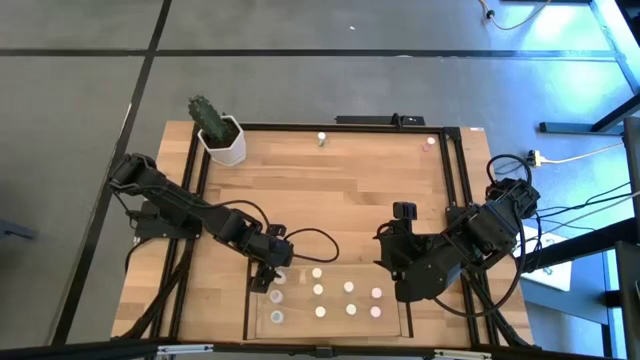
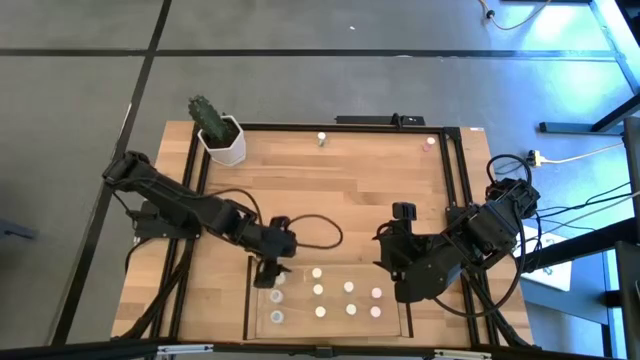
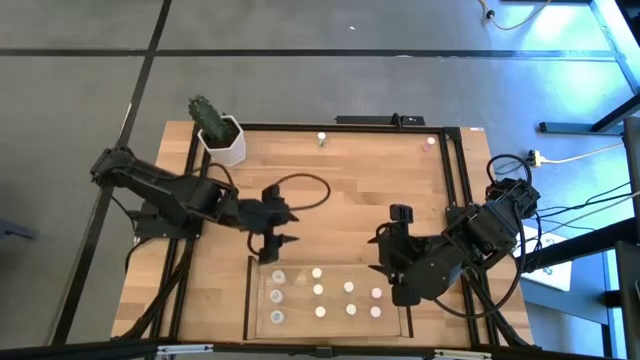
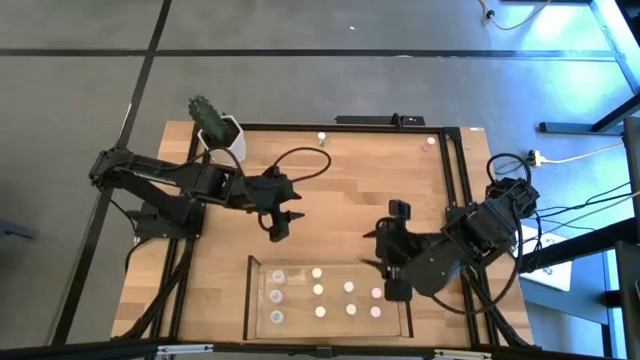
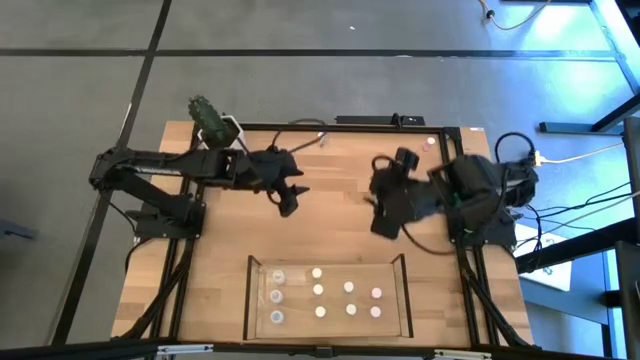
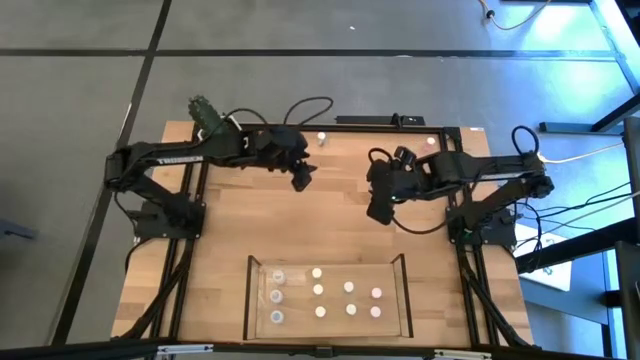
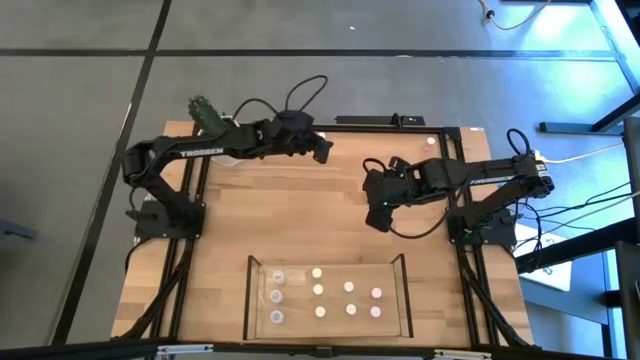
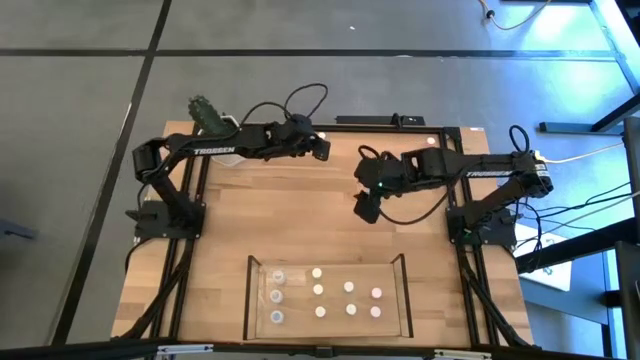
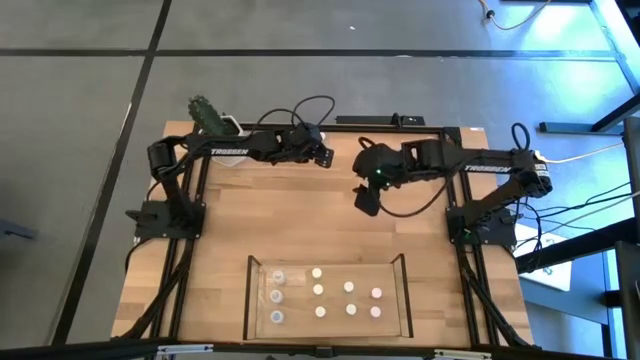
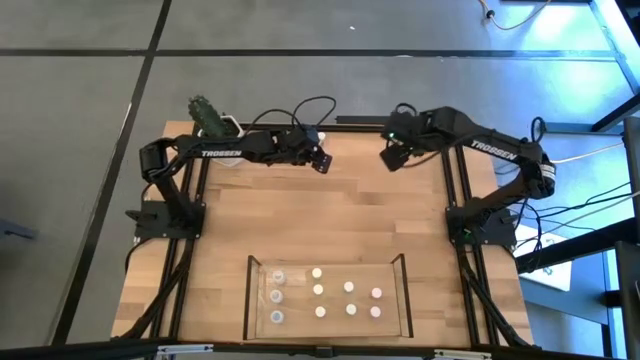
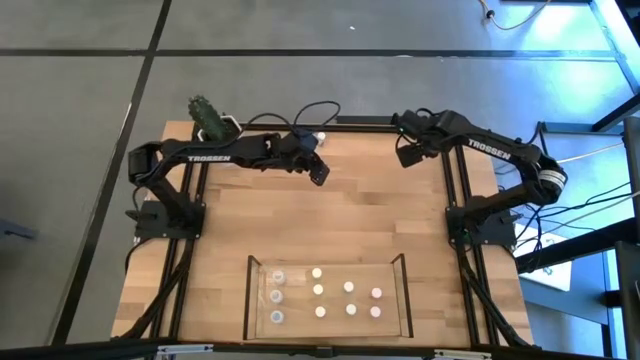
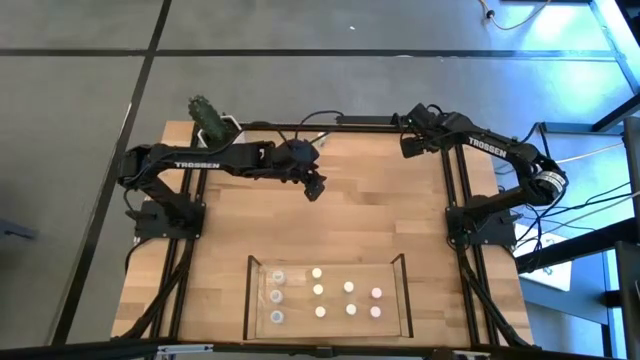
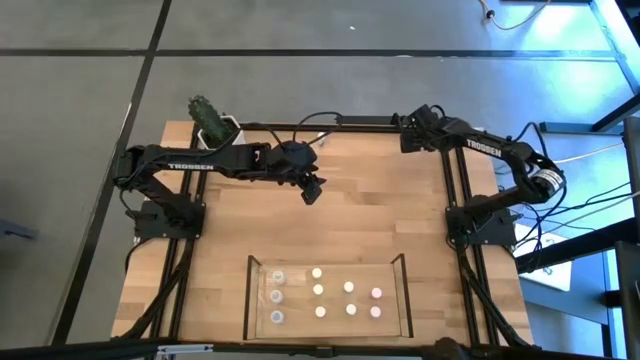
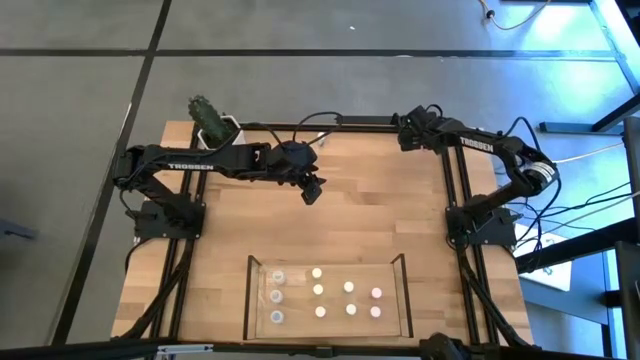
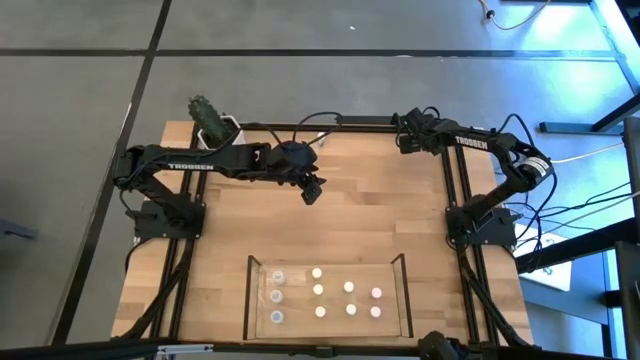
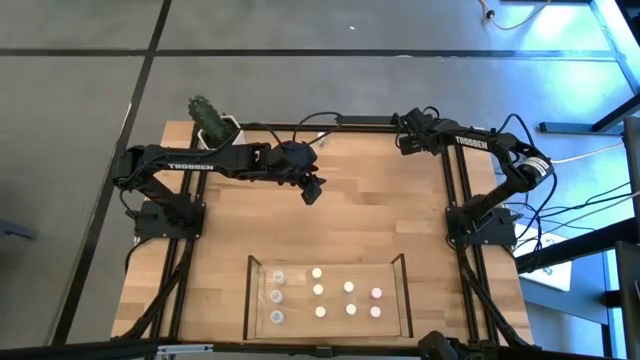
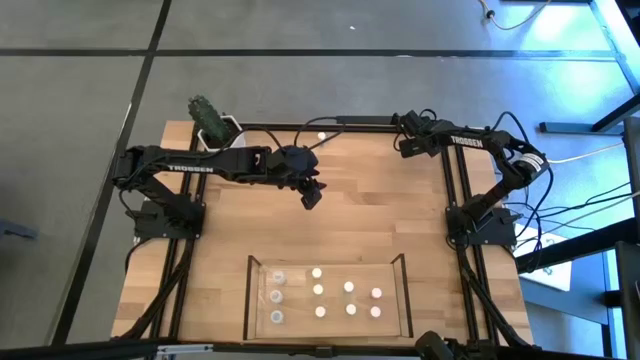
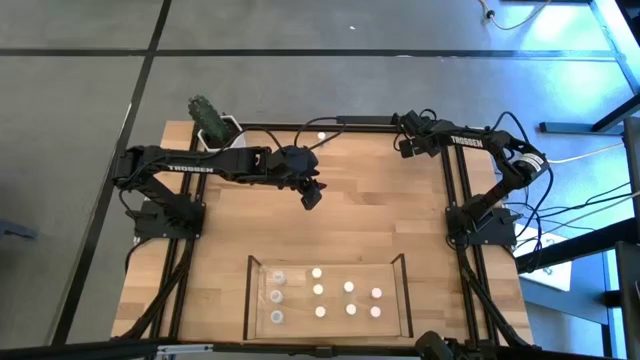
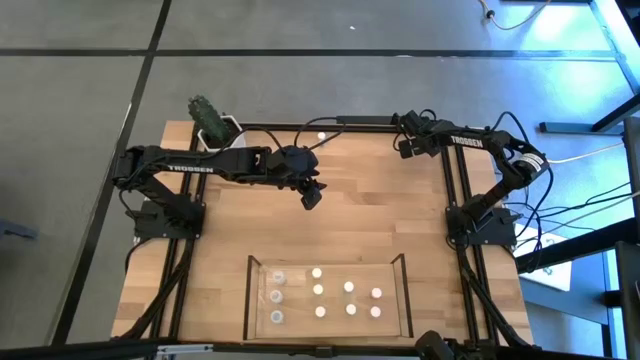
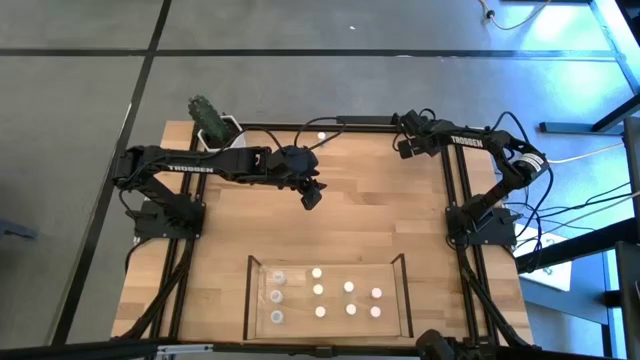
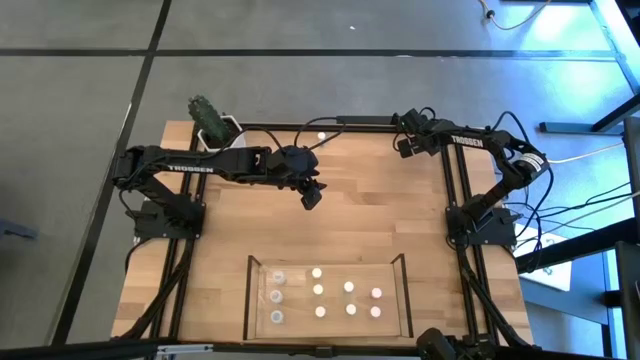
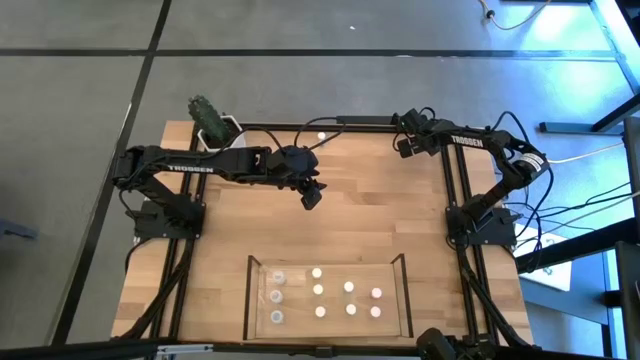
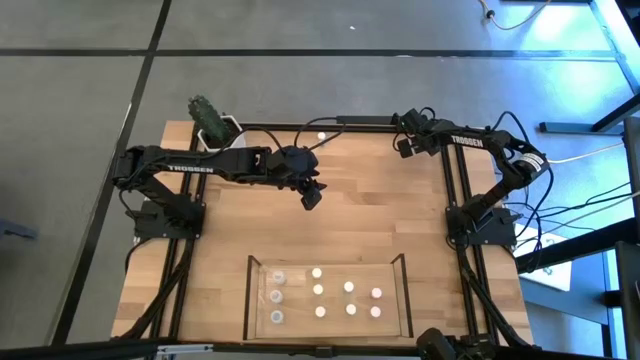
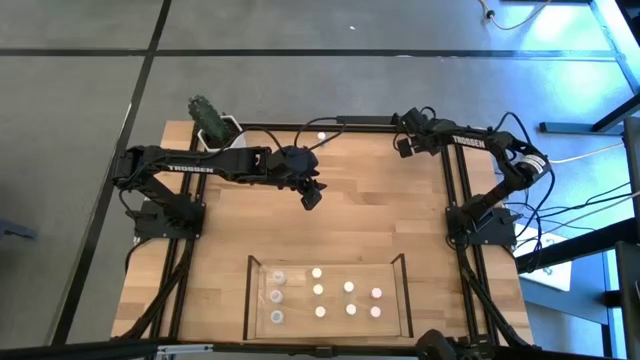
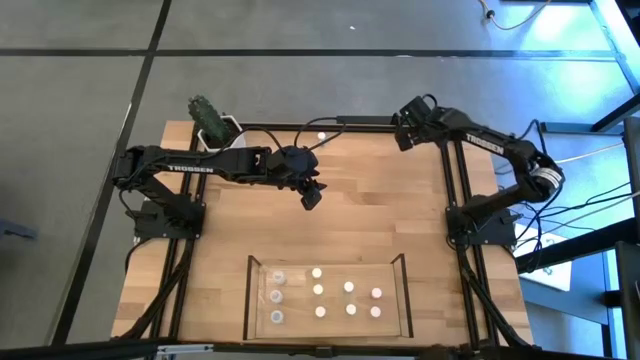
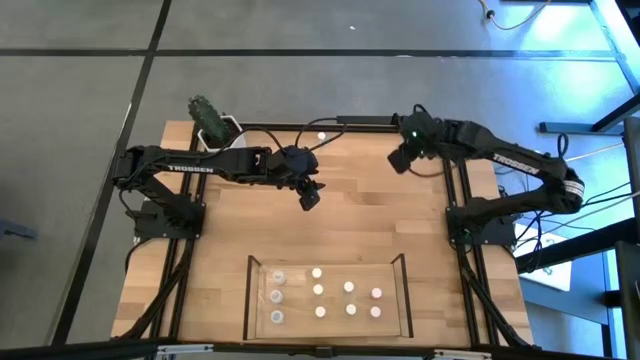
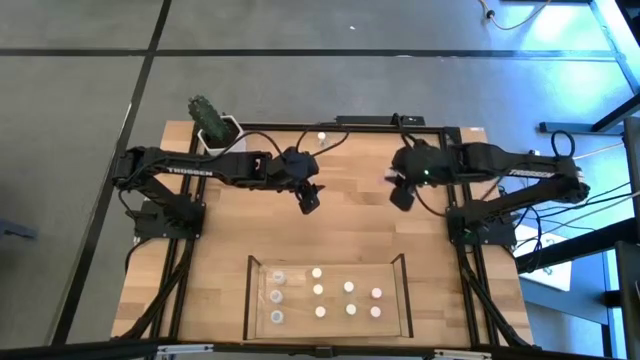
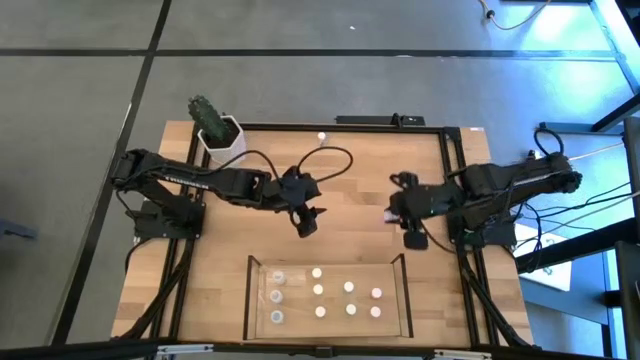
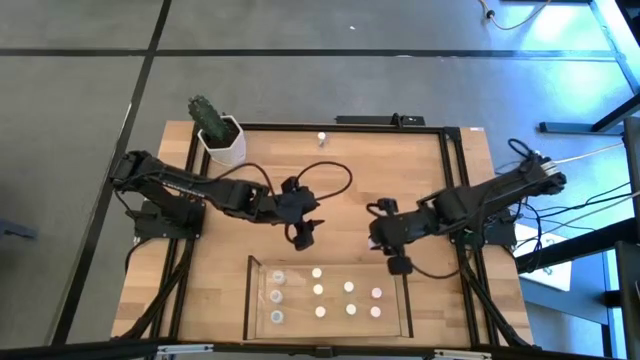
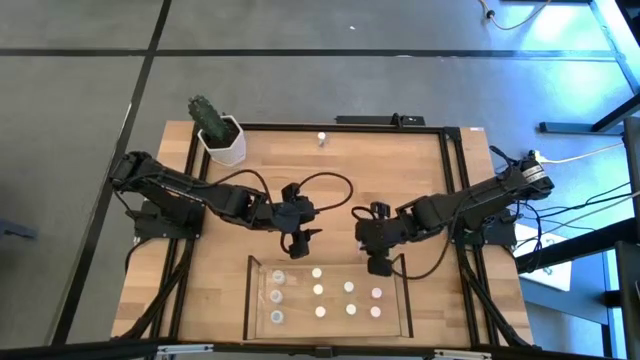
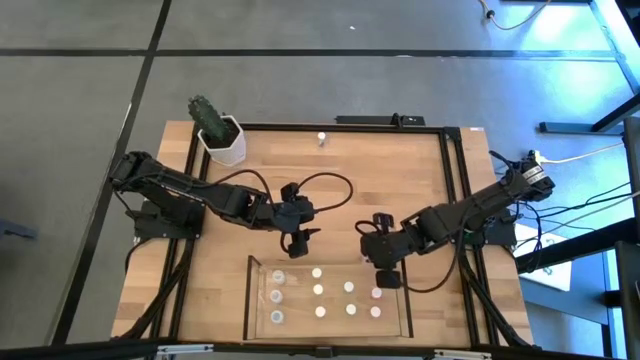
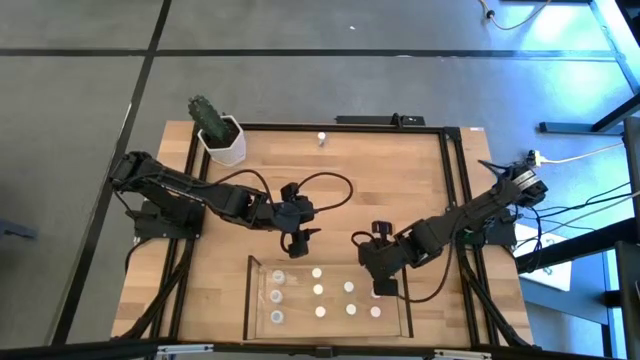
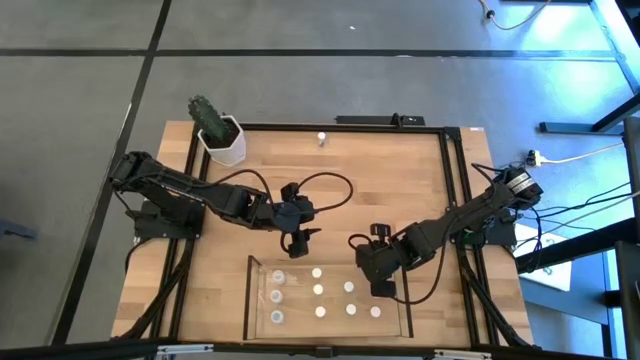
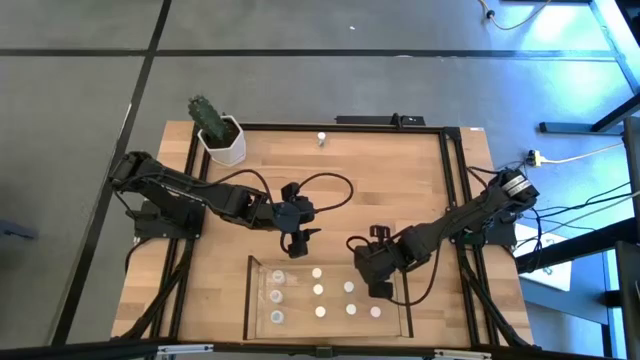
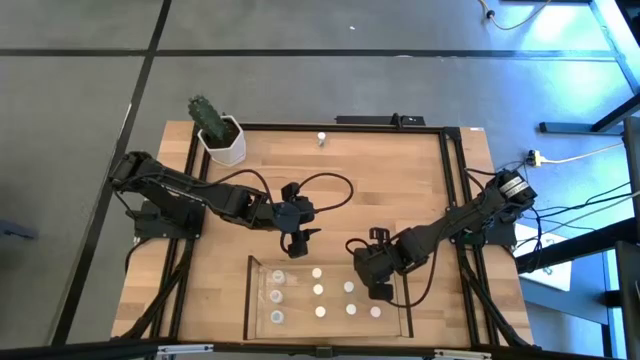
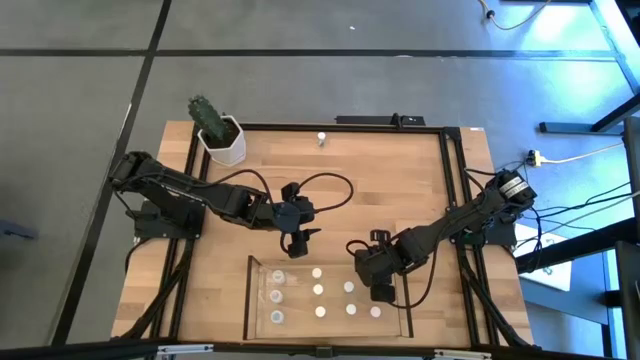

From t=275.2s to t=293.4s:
Task: Pick and place medicine bottles onto shelf by color
Put the pink pill bottle on the shelf aligned with the other pink pill bottles

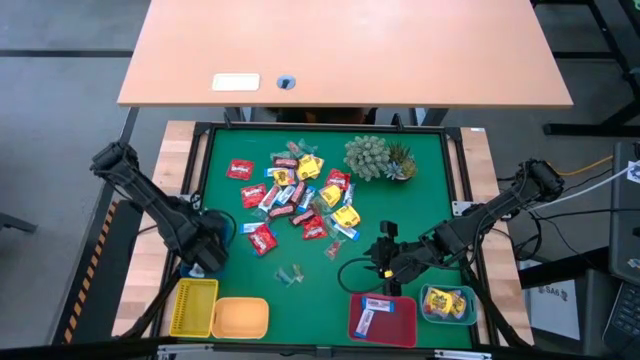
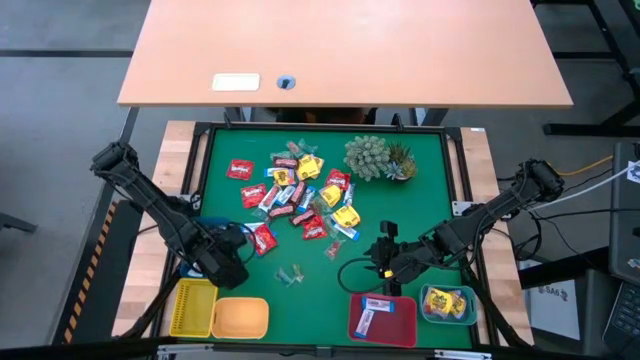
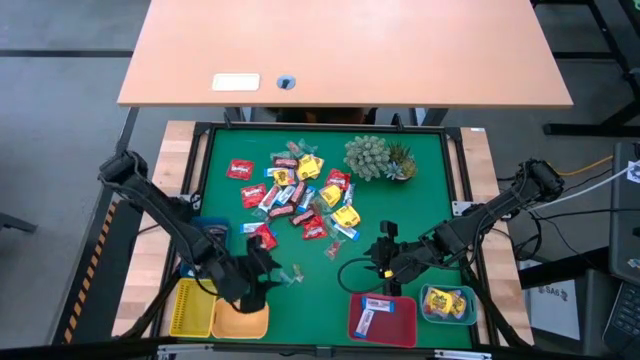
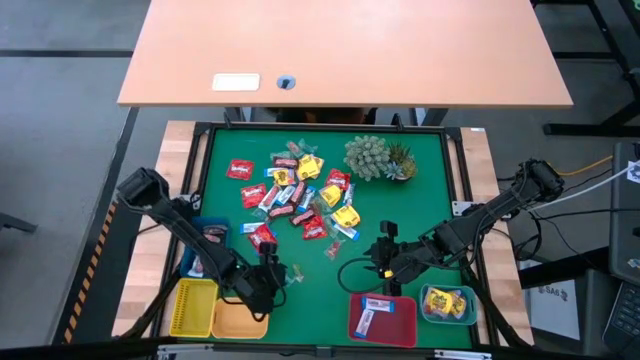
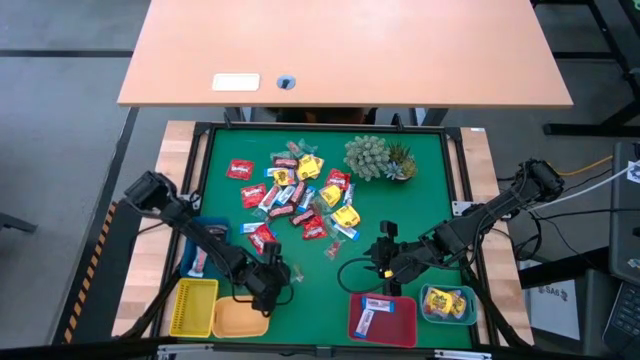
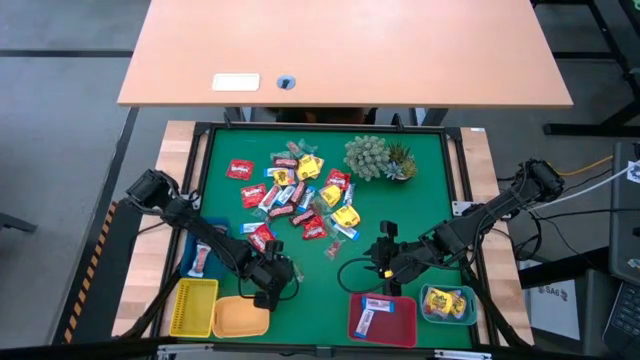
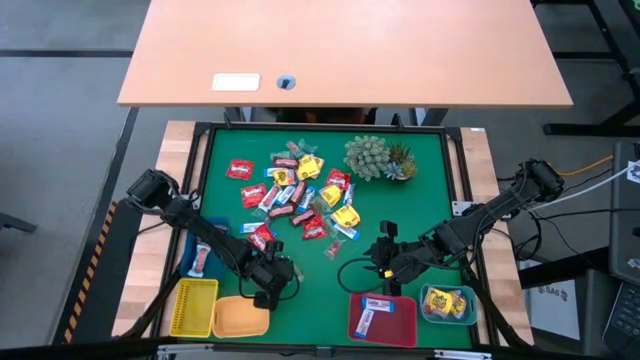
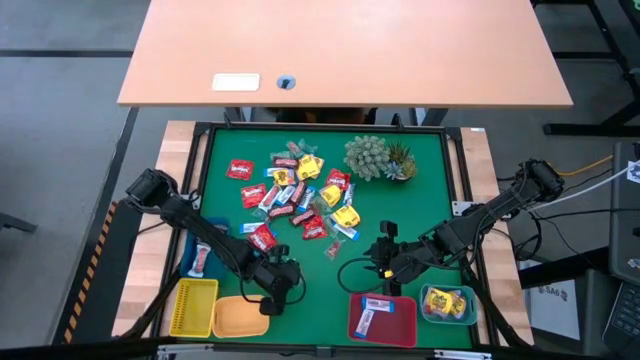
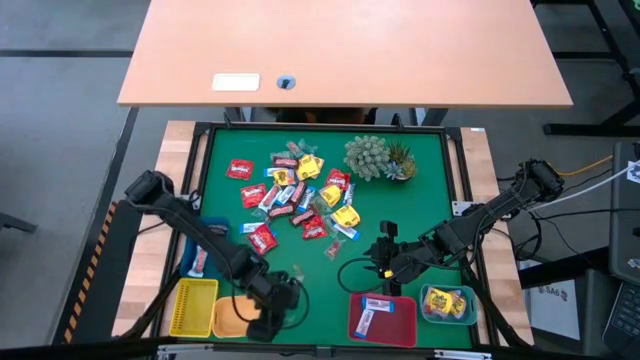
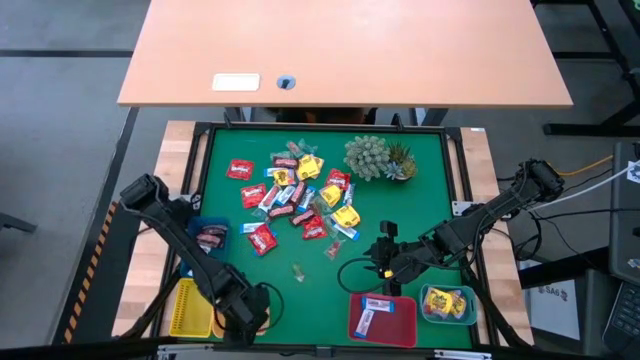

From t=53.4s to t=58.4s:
Task: Sort candy
Put the transparent candy into the orange bin
